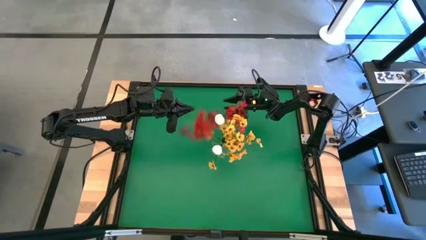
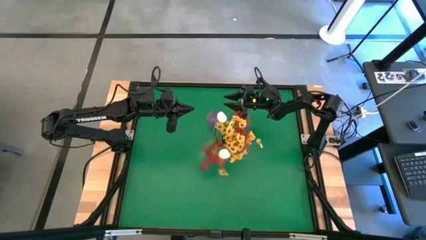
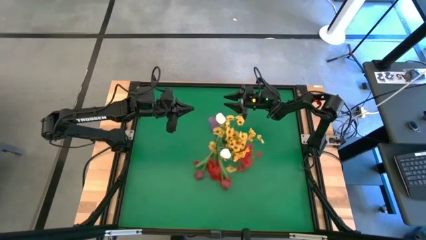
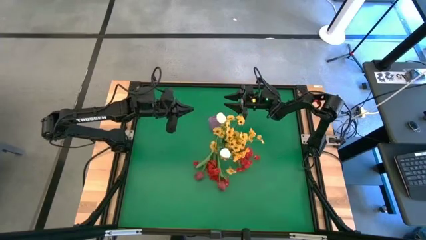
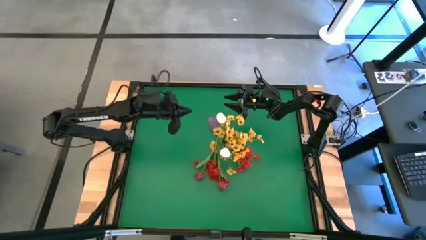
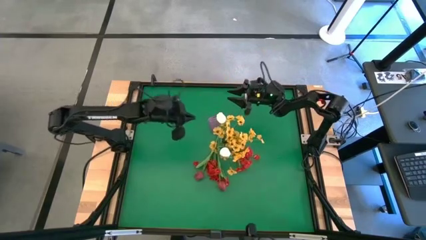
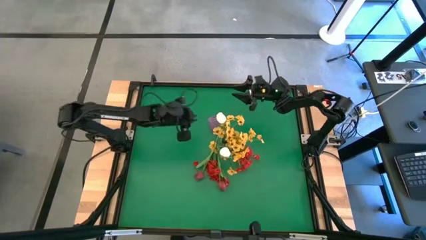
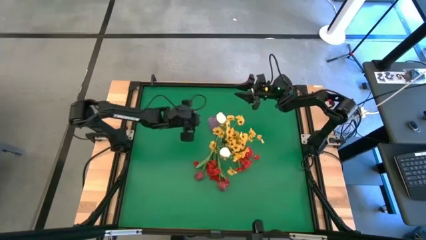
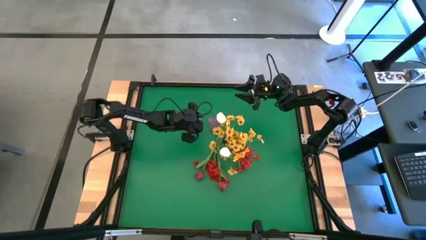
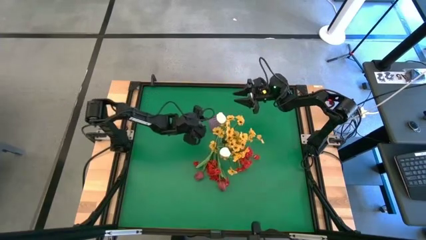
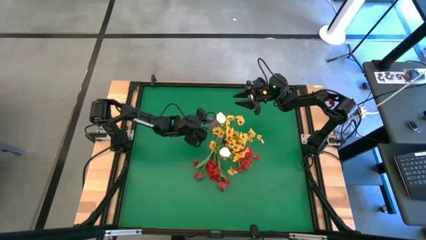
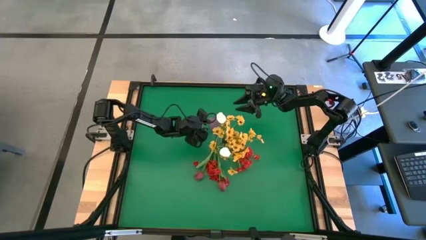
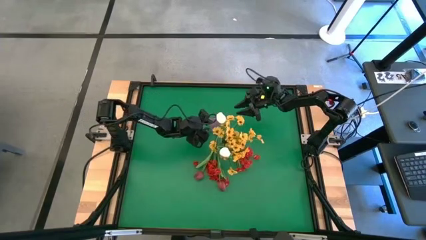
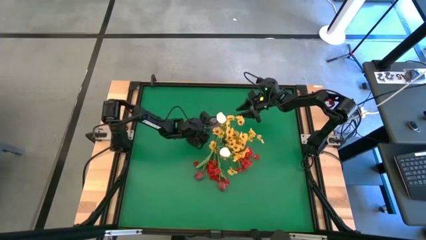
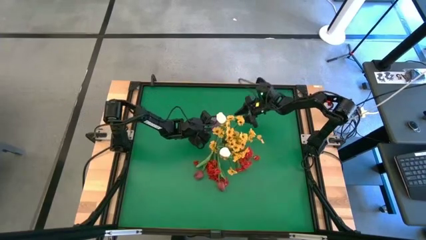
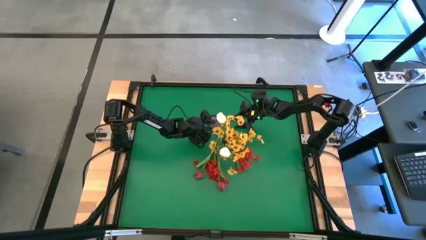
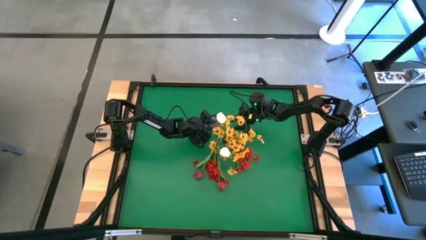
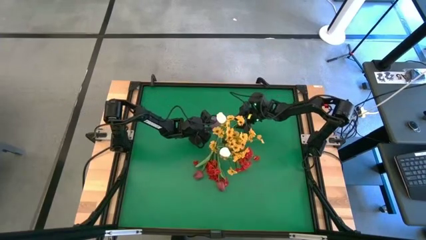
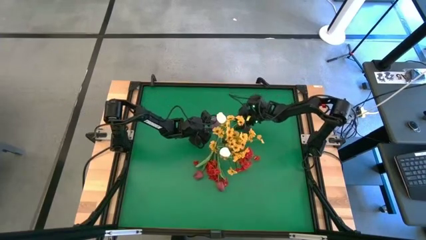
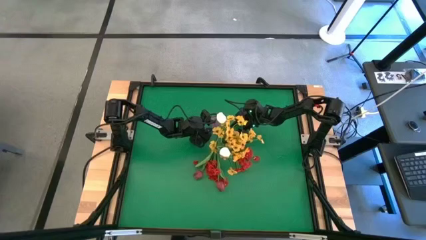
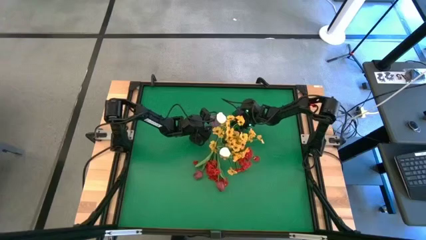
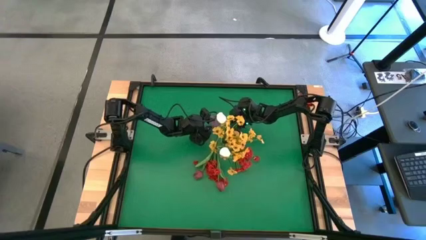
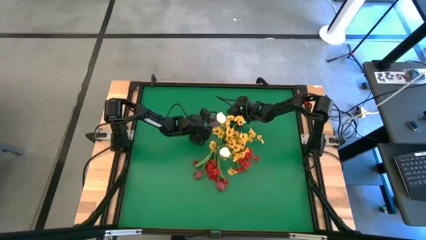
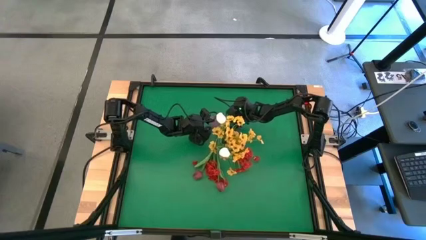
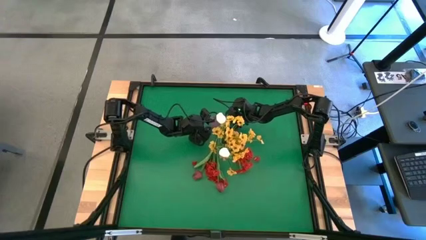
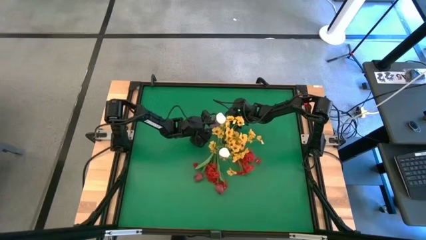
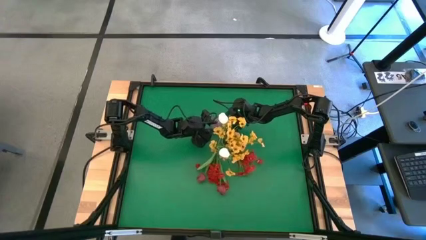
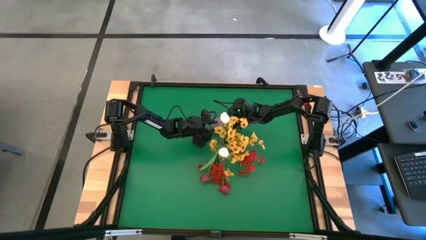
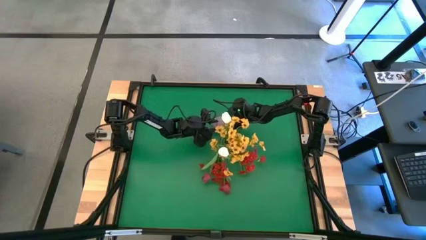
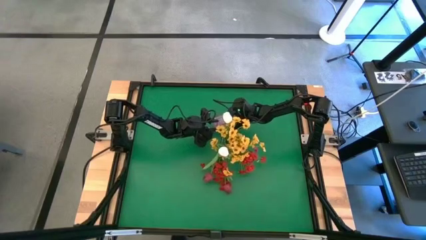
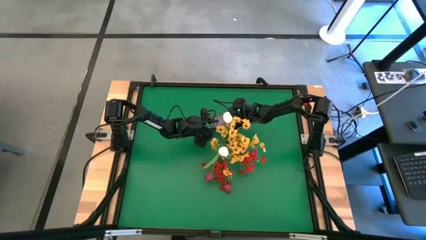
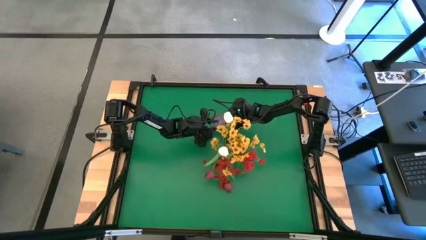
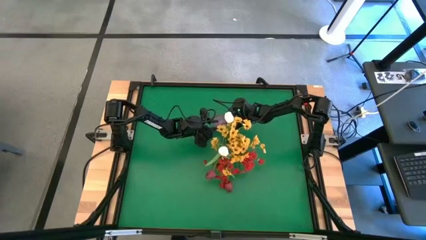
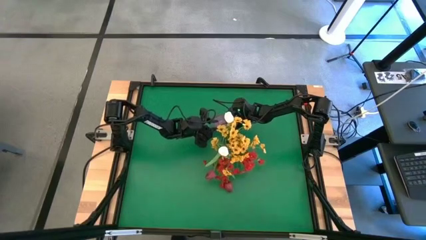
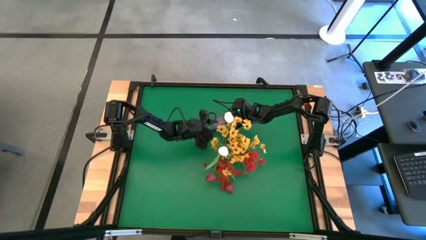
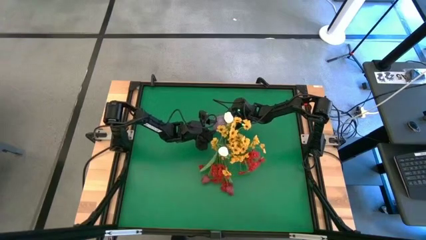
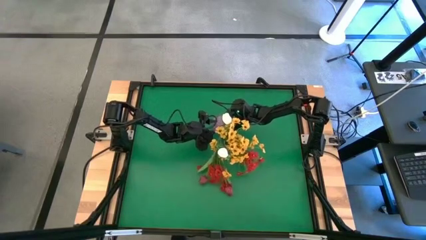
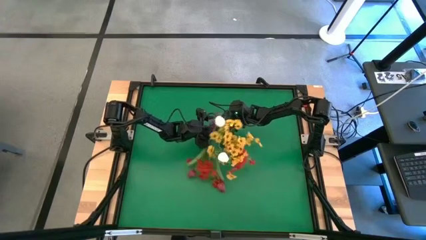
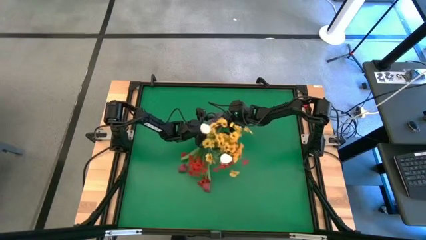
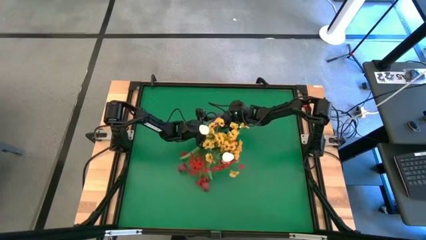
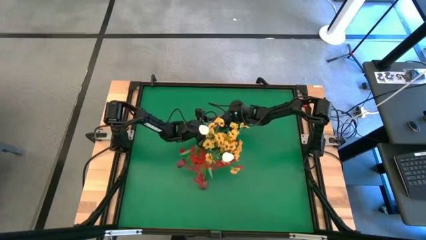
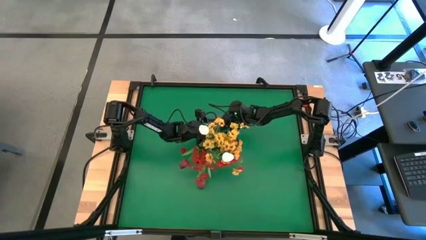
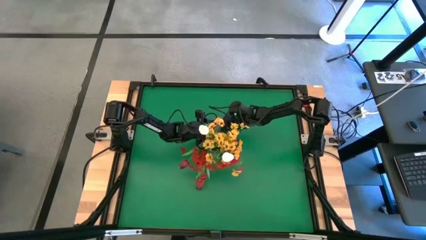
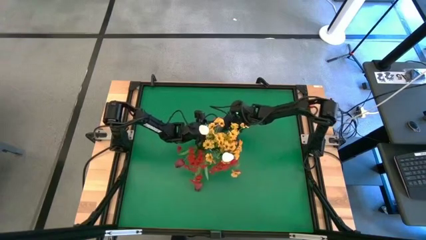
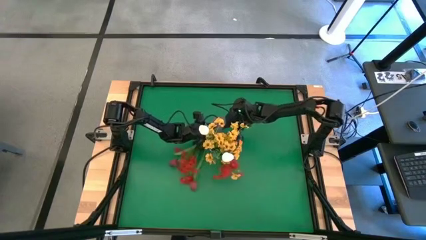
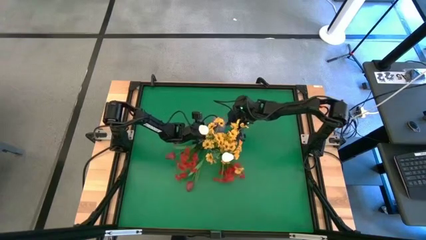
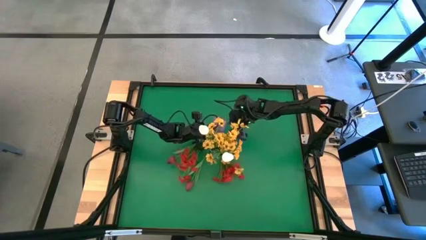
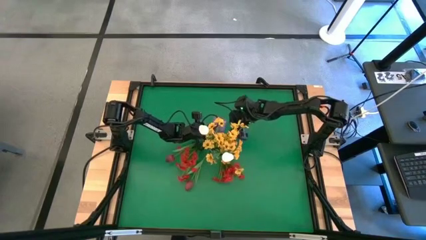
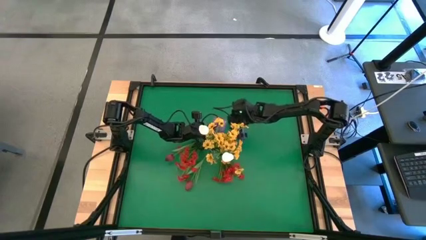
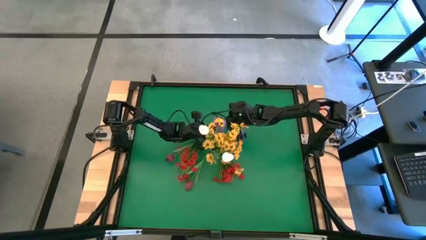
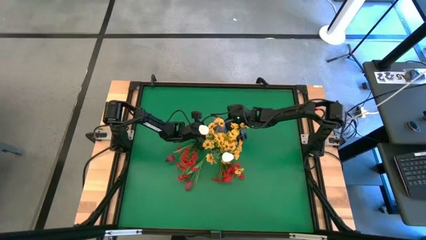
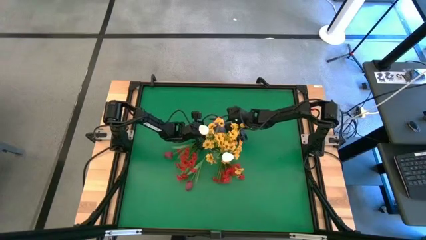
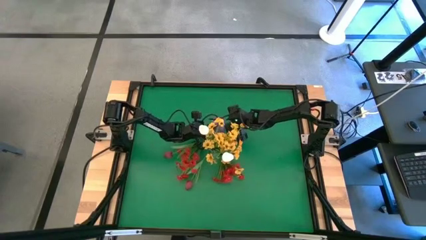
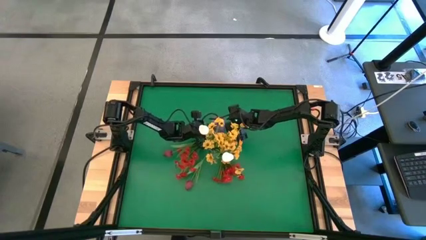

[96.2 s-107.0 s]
Task: Sort flowers into vase by color
Adjust the violet vase

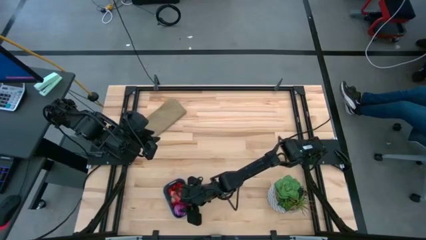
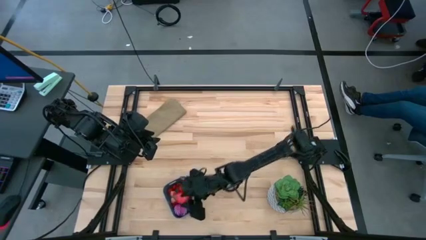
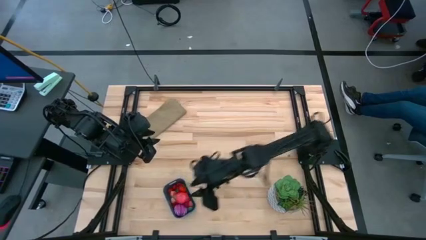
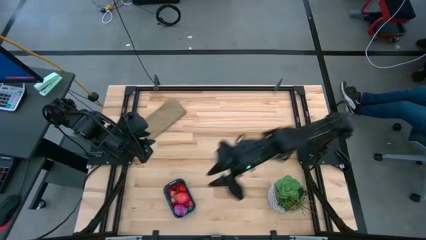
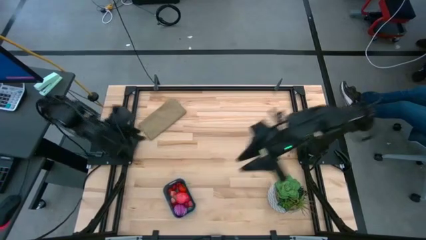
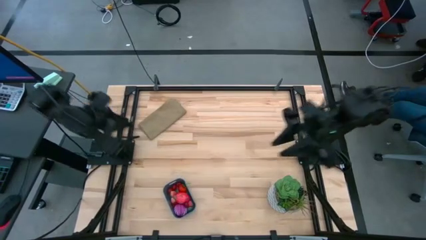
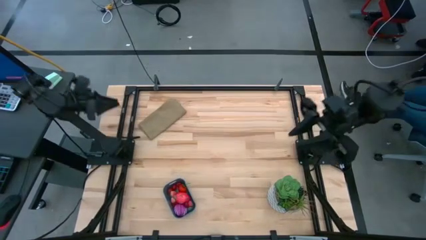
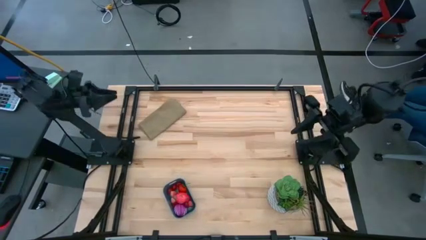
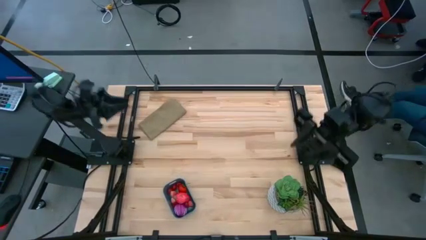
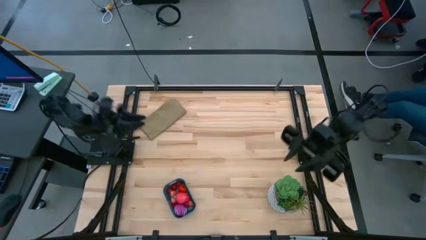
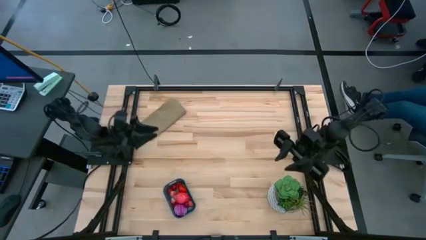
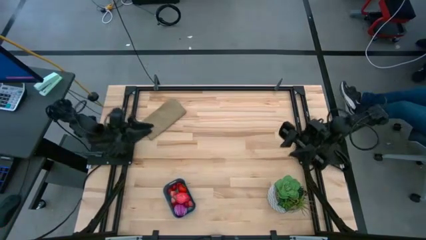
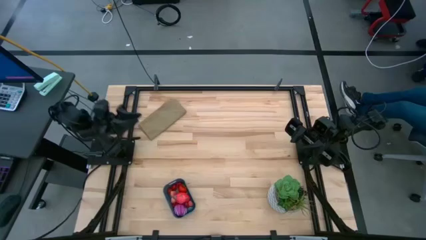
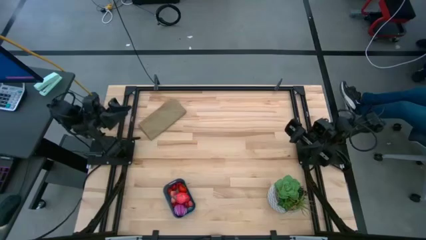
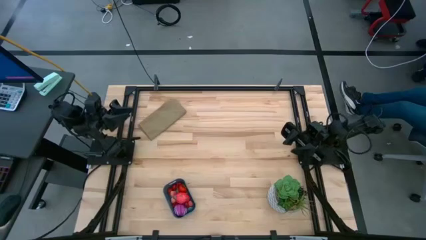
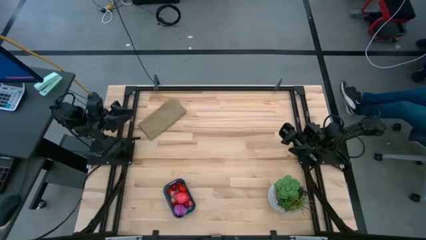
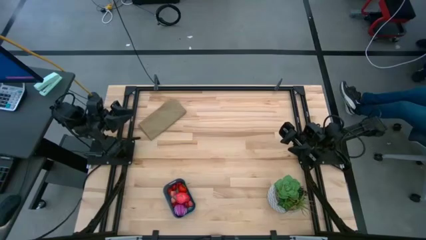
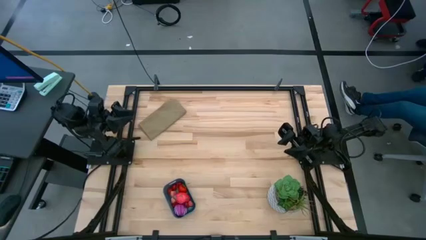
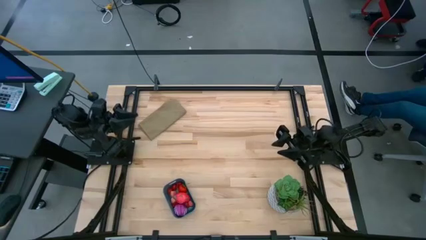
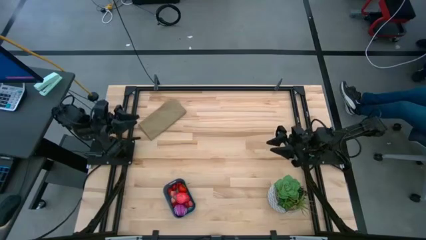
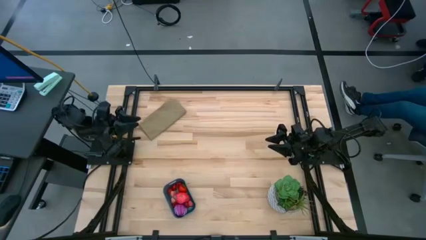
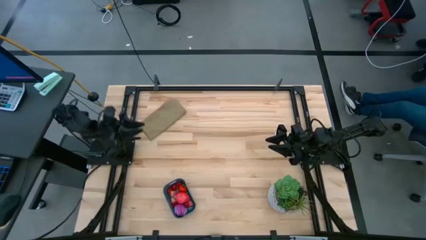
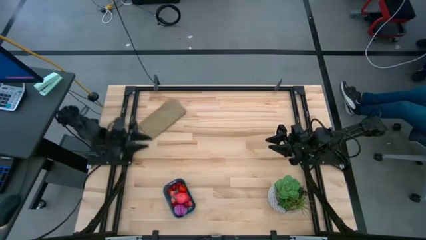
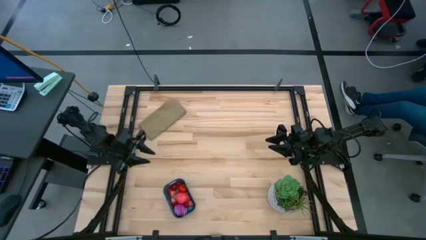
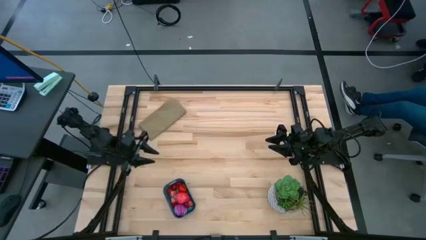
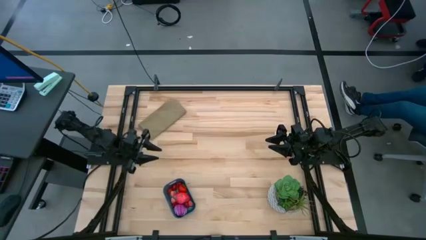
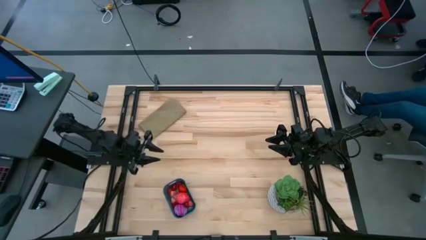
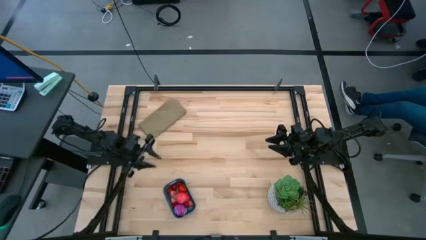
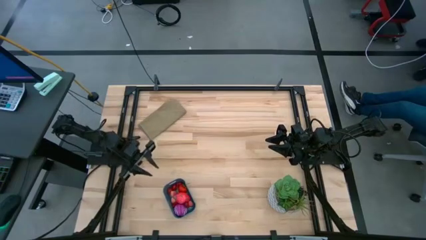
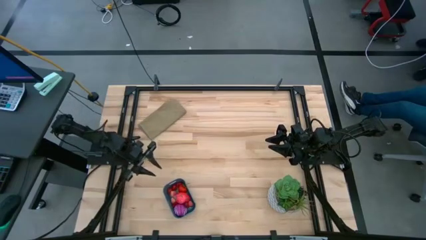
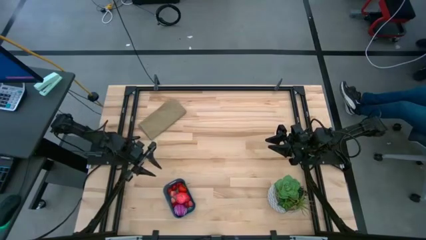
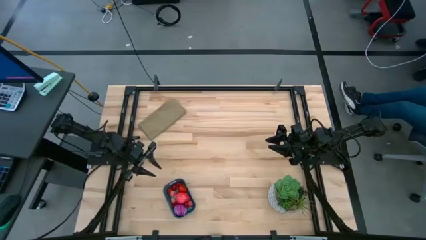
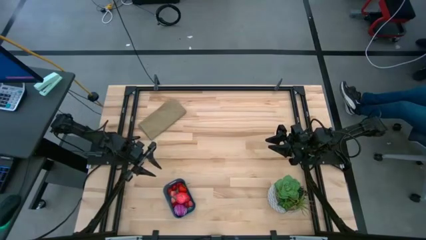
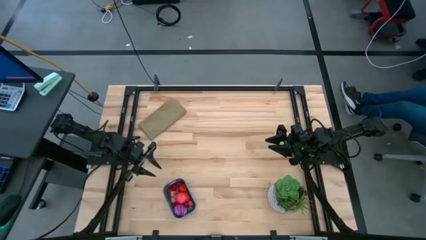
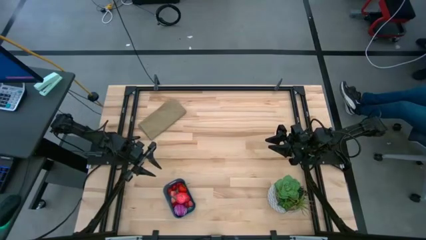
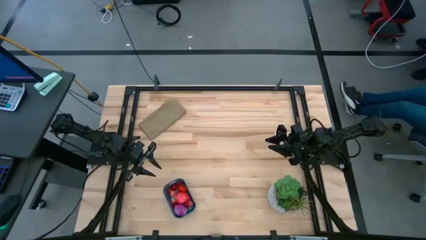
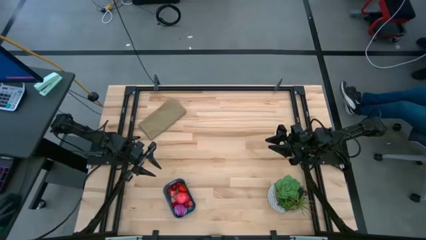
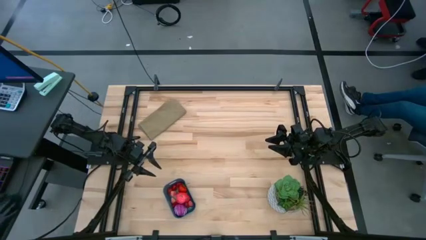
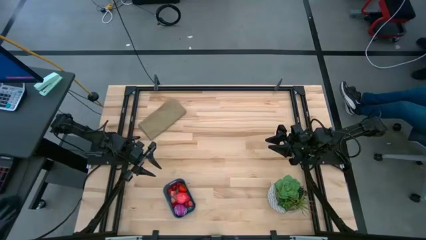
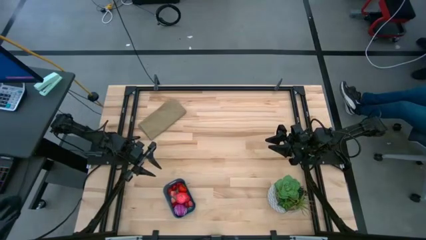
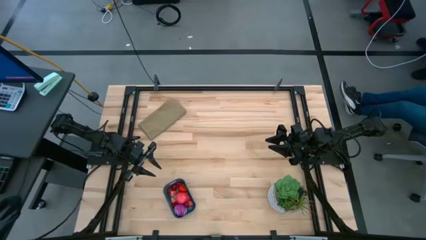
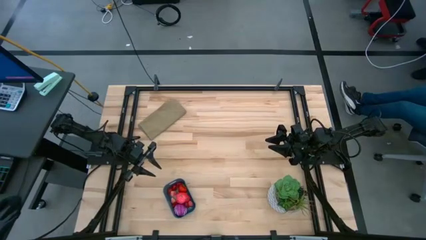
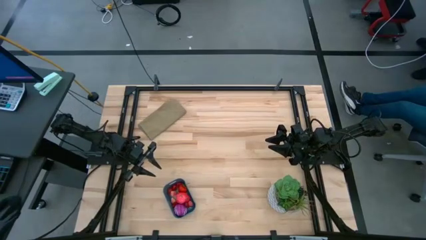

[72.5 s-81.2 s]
Task: Pick and placing Produce into tupperware
Return to Home Position
